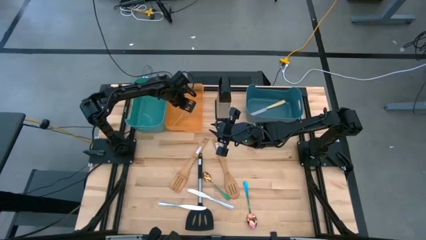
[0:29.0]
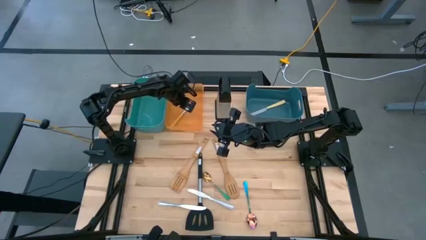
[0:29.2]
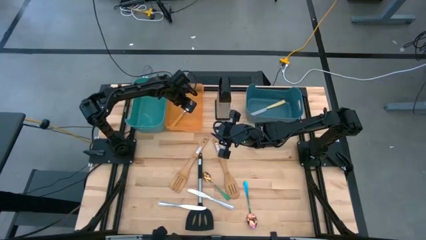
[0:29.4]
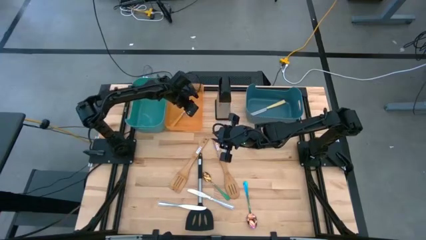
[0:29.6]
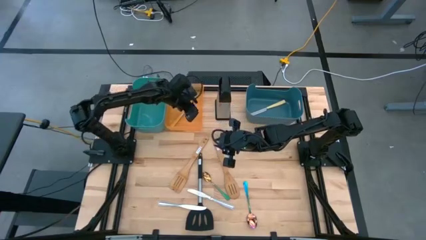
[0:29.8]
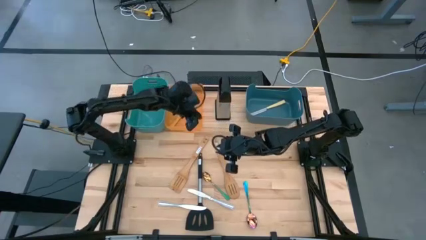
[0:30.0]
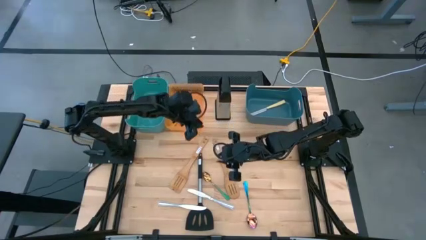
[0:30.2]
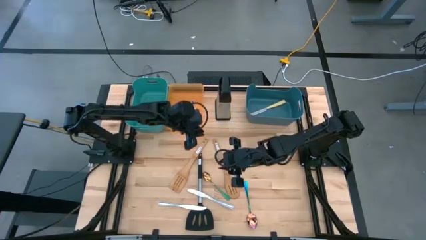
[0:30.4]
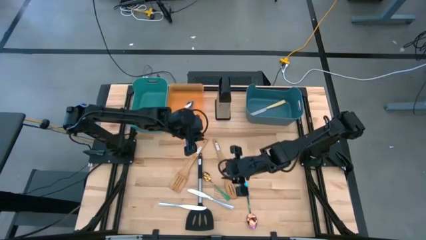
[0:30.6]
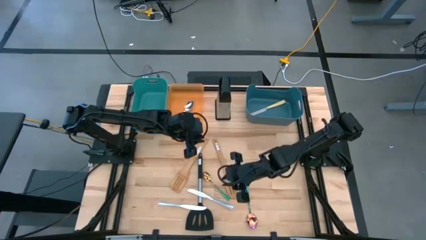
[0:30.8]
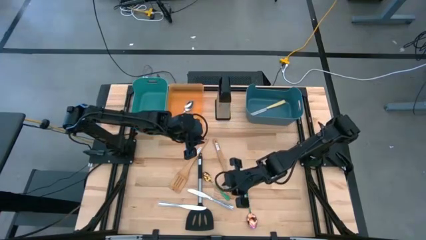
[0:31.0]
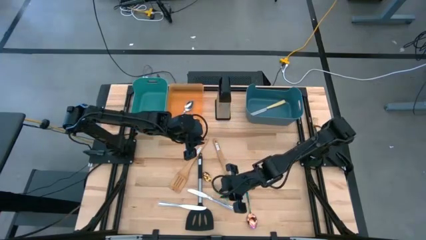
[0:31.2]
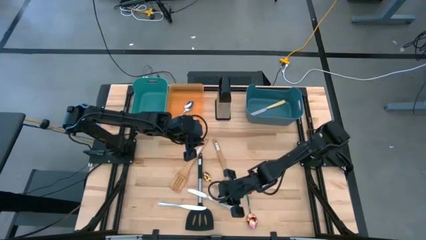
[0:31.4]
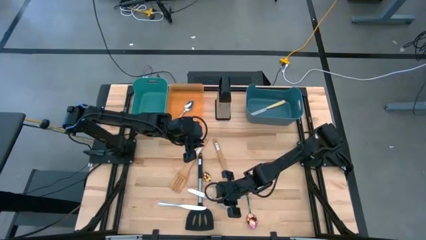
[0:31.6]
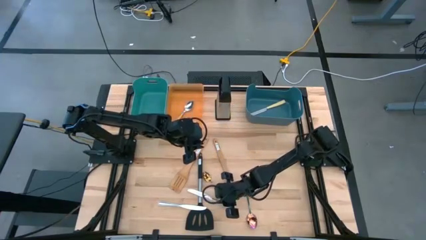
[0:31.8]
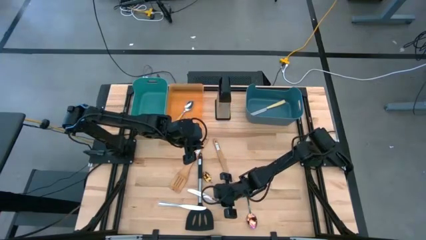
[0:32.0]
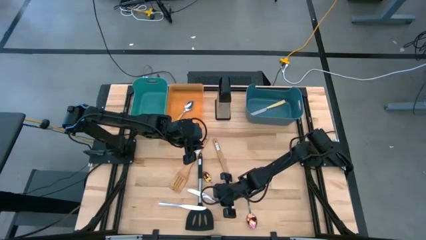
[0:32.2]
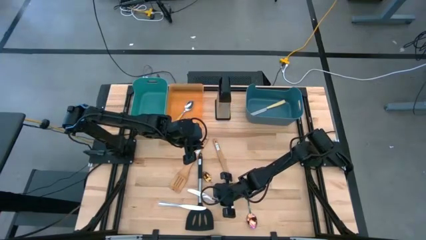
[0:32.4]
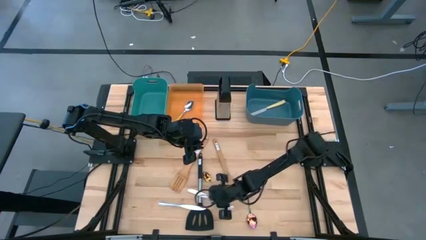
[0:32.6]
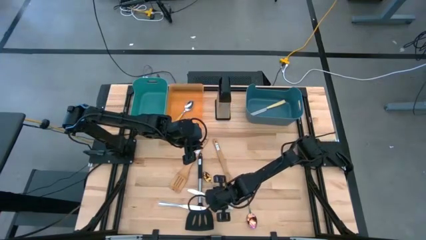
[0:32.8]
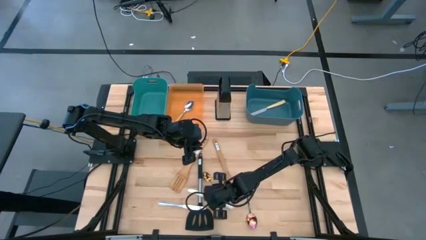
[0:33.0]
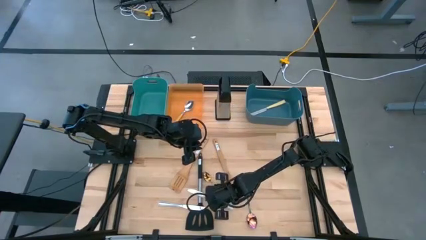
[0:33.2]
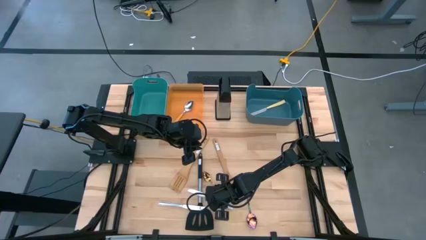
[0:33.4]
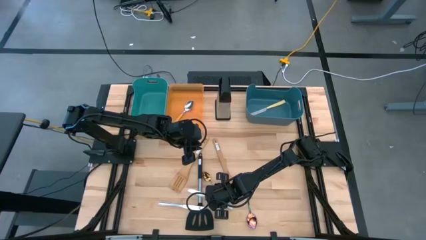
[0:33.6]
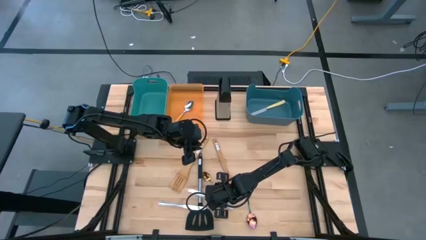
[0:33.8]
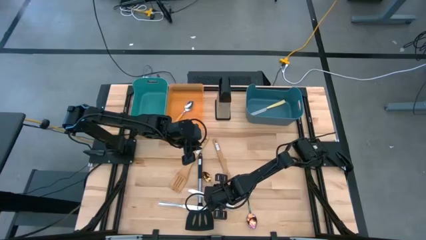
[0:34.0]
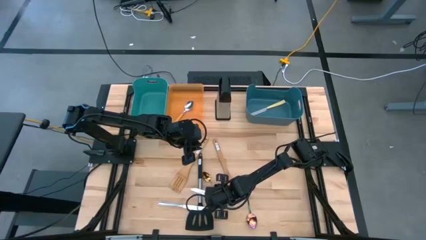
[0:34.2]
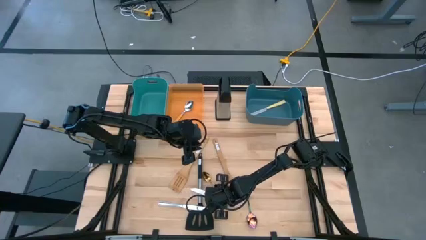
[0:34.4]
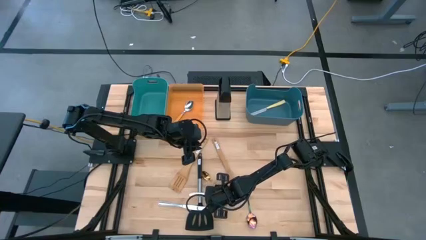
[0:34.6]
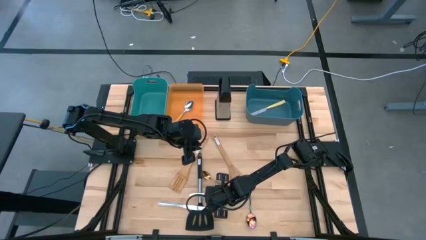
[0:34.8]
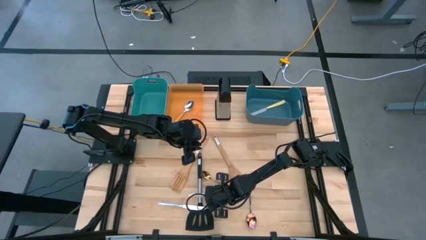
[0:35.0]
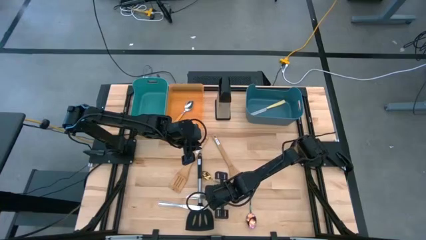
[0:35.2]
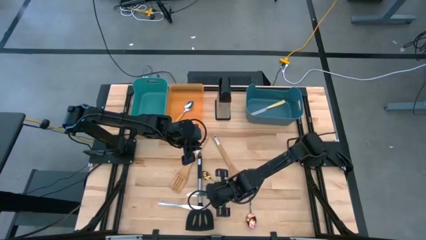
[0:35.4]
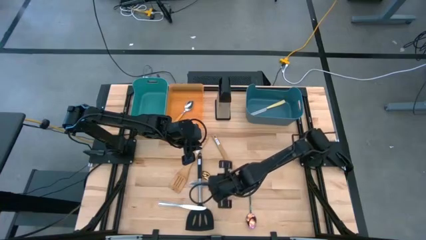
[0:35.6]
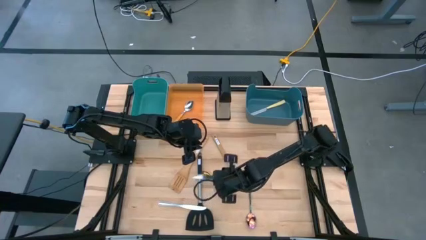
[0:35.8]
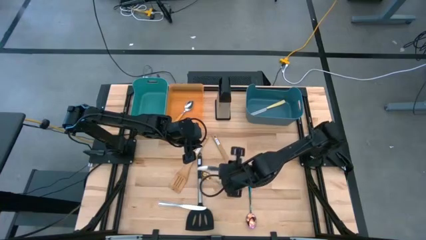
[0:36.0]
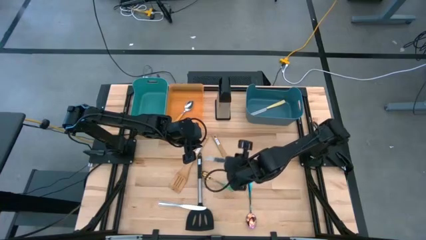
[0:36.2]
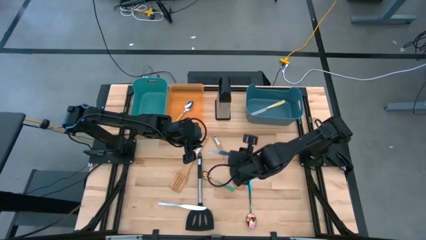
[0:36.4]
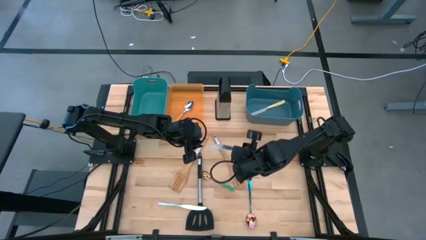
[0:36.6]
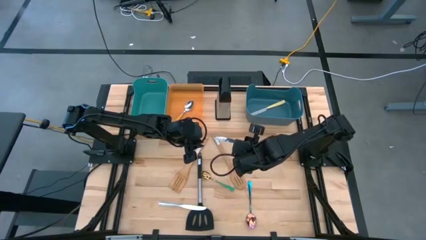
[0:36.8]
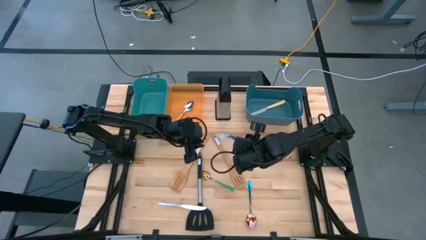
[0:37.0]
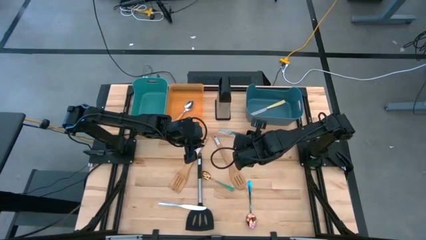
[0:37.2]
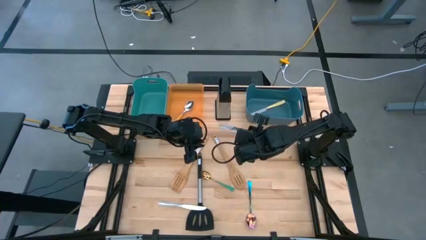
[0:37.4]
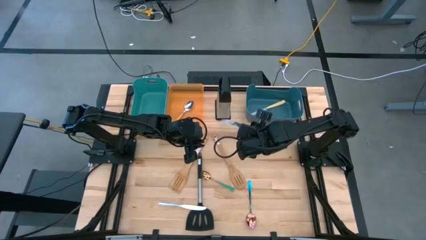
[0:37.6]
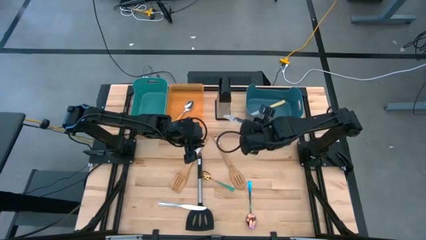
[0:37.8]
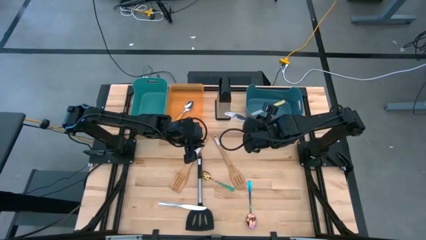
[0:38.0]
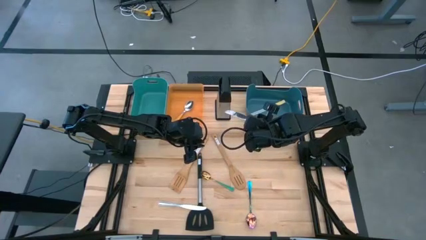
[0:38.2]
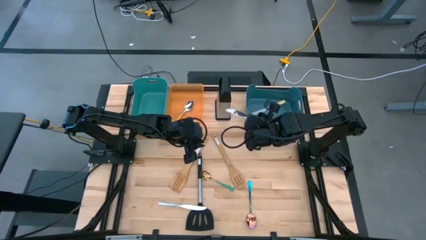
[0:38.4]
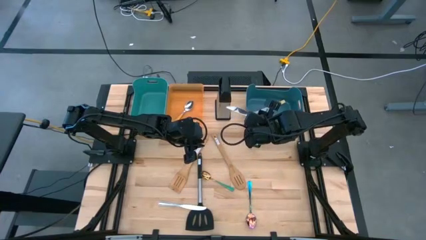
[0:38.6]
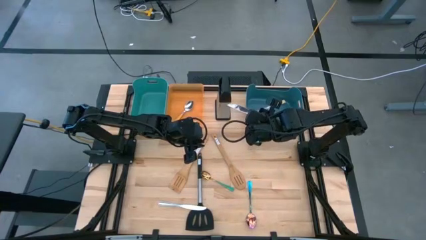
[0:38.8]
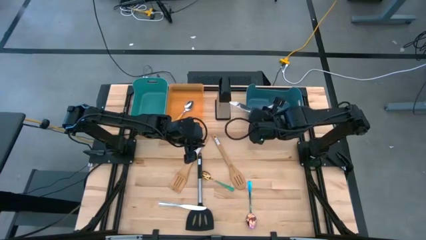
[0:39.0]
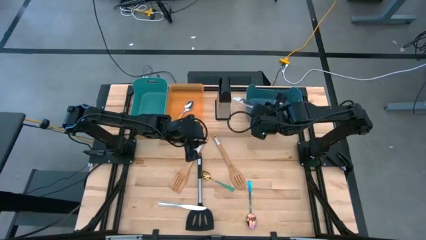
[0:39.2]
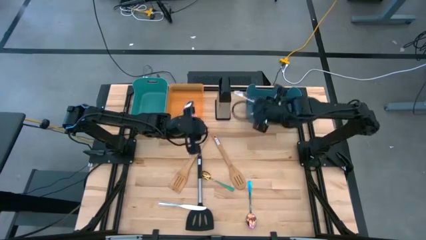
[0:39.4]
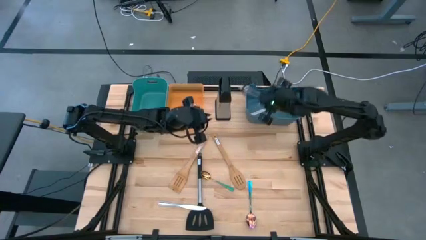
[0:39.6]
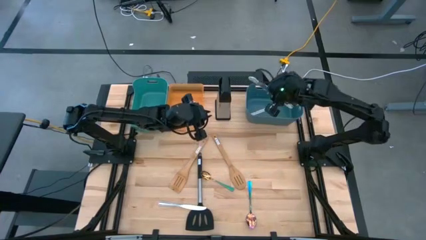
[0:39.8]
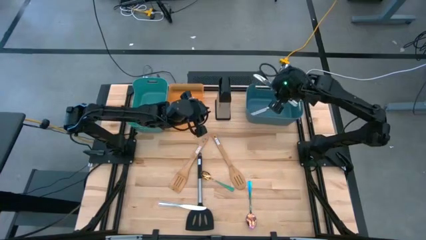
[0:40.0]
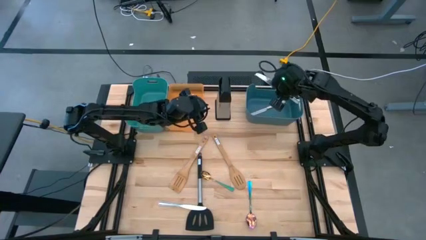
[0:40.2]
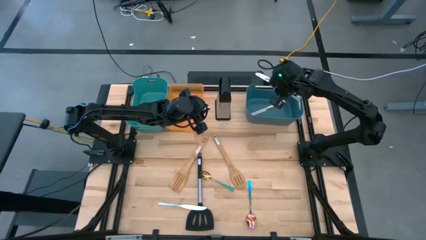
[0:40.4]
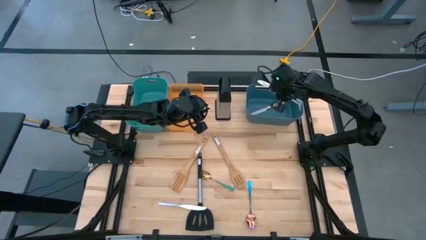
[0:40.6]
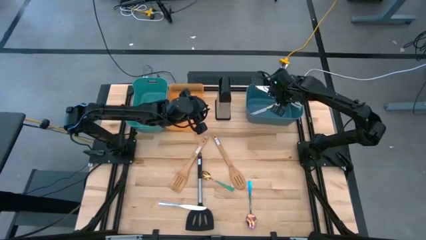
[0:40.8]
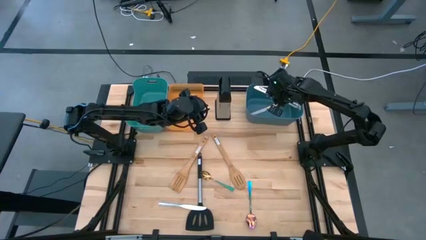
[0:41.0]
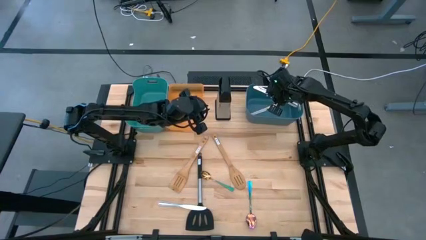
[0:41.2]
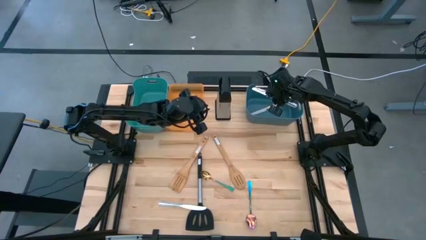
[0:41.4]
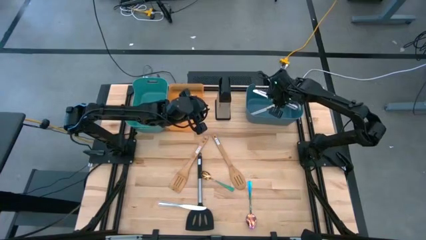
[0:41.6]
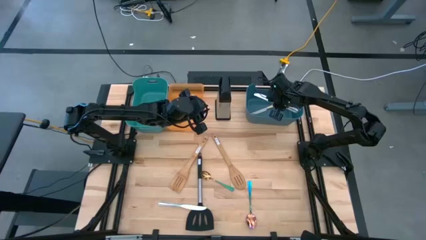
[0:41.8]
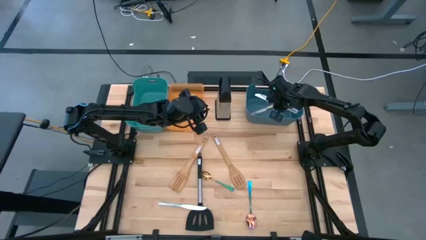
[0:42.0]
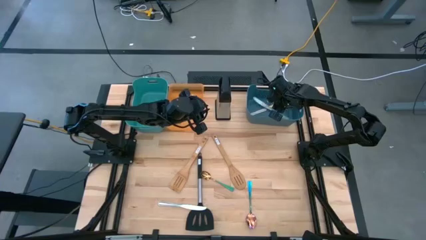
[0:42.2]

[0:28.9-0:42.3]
Task: Pick & Place Kitchen Items
Put the right silver table knife into the blue bin
